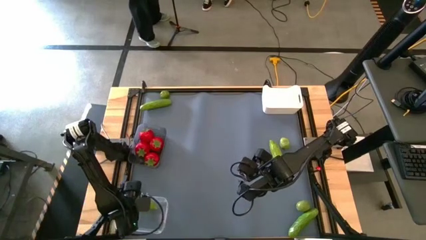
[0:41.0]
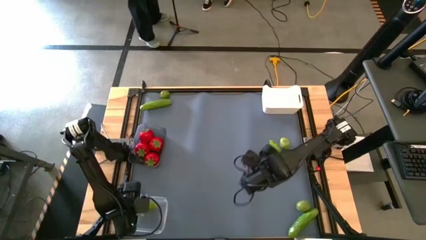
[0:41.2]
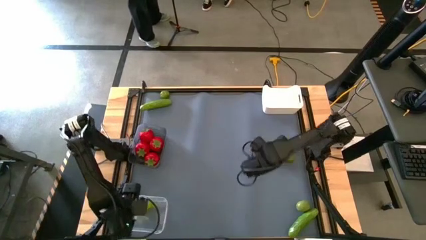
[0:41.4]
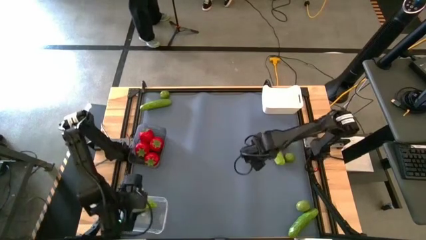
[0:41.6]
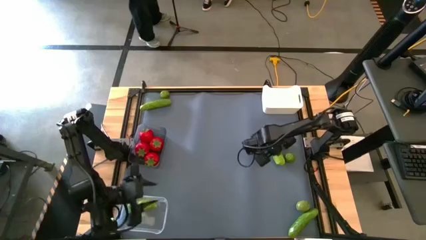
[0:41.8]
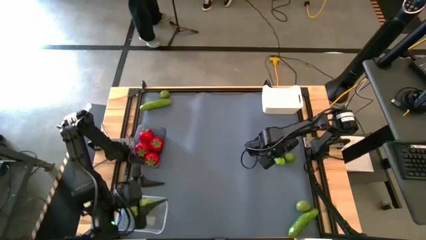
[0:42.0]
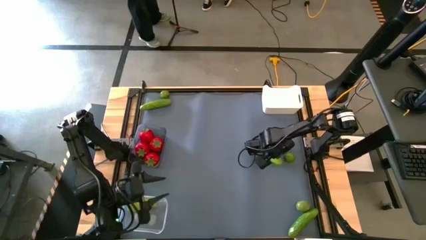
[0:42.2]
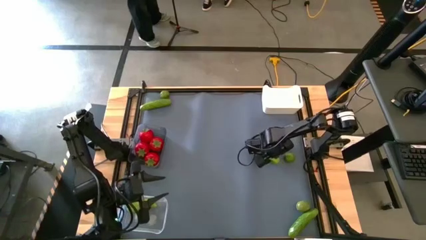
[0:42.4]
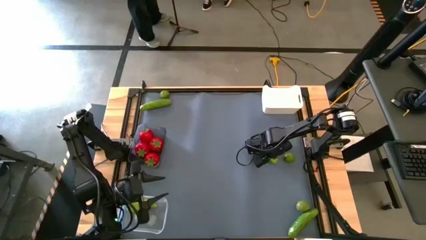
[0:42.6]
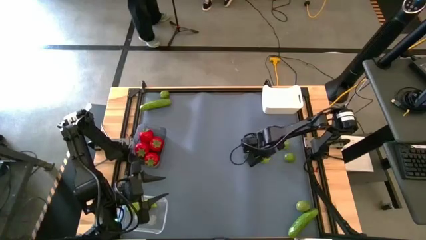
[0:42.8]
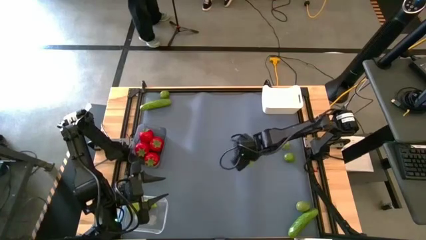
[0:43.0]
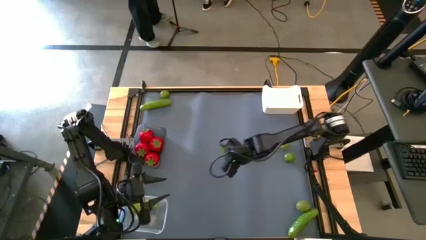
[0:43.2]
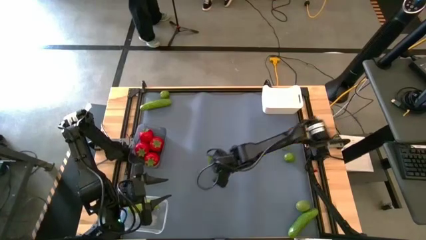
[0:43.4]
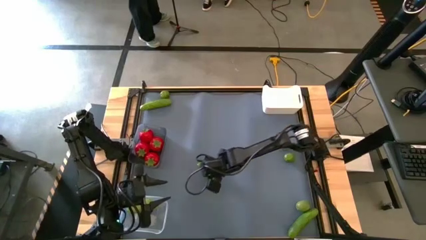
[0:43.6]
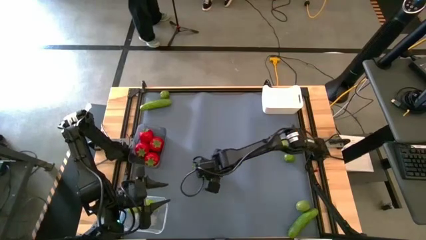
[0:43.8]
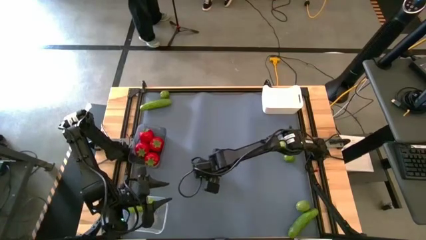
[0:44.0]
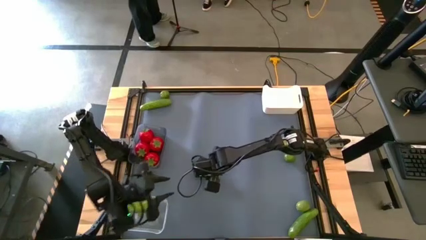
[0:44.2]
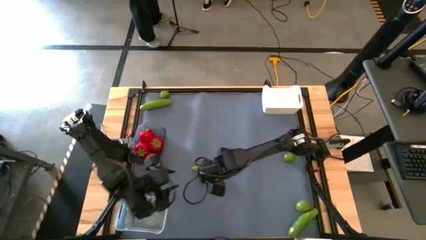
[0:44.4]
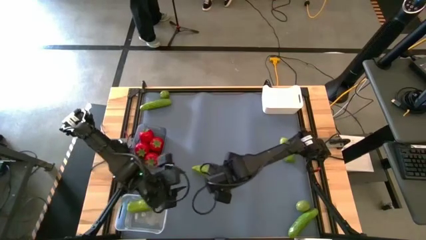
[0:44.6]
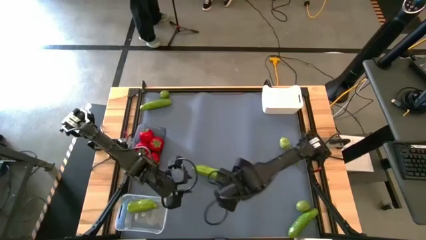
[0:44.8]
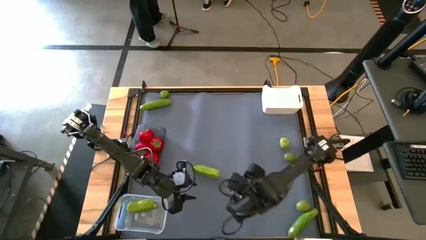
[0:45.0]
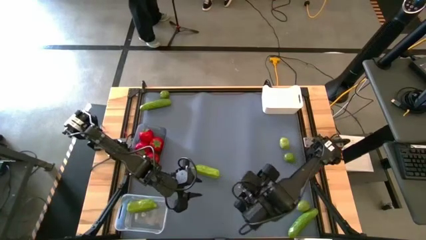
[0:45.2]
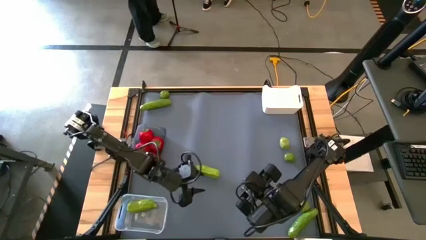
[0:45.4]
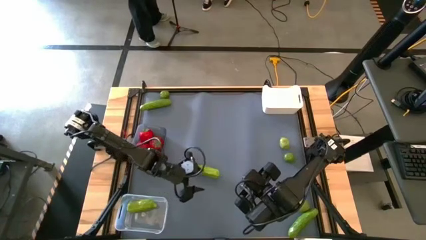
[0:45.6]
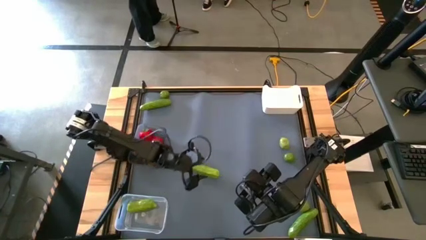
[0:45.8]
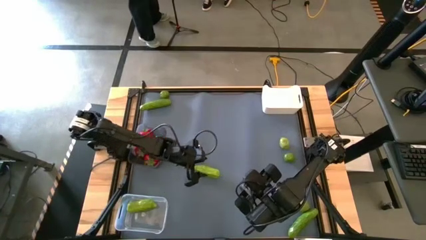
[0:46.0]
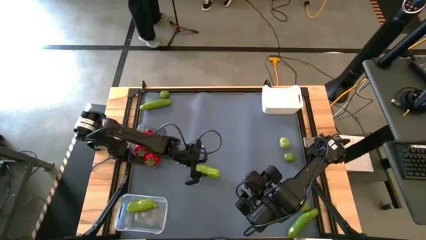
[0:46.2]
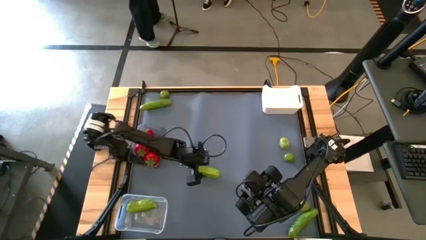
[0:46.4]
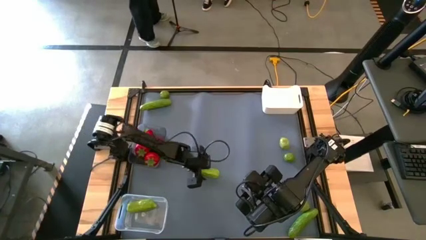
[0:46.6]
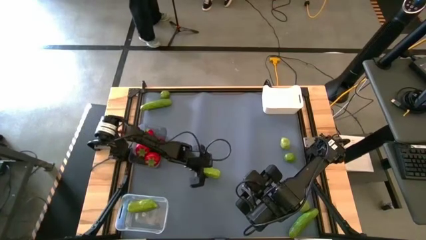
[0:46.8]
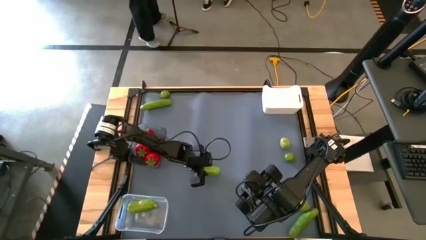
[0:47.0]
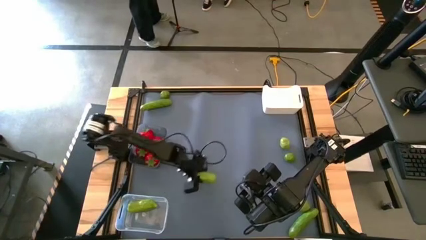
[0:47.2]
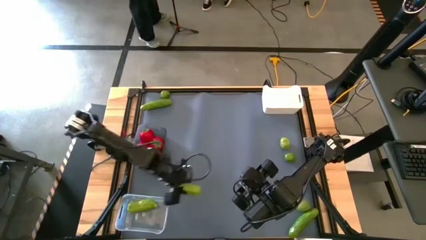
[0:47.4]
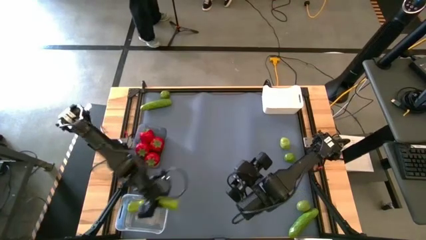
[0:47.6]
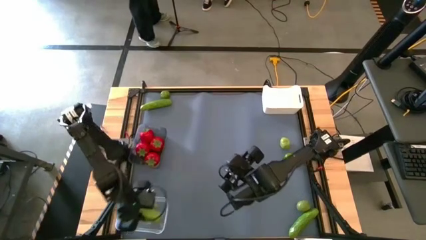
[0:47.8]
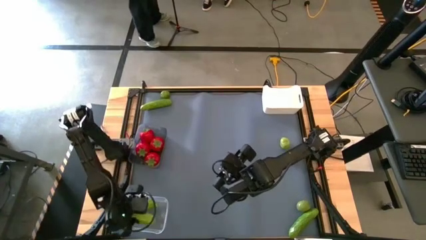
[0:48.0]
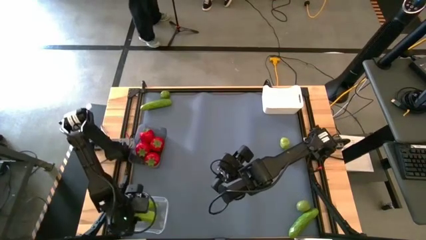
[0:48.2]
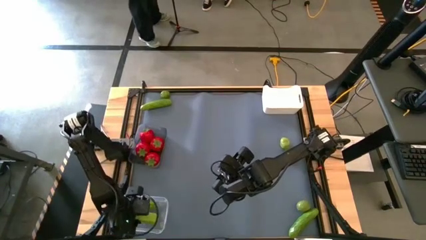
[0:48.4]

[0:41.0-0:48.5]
Task: Sort produce into baskets
Put the middle right pickle into the transparent bin

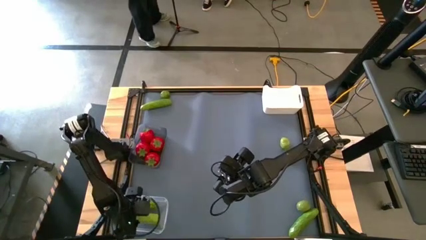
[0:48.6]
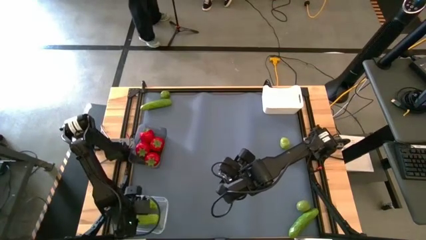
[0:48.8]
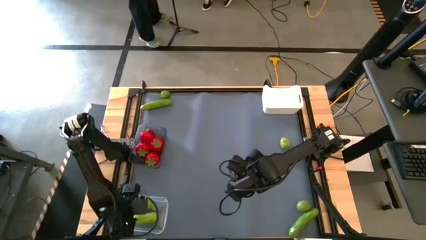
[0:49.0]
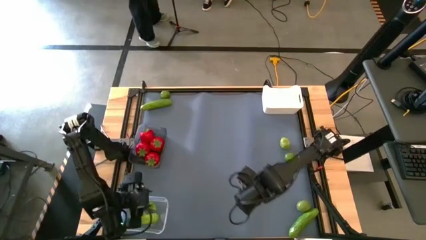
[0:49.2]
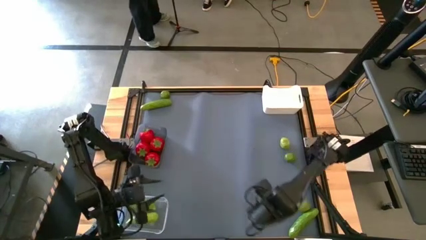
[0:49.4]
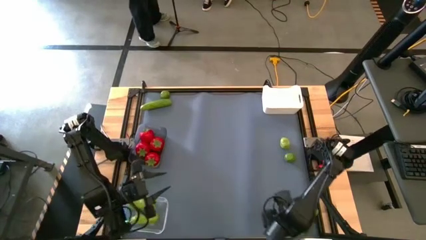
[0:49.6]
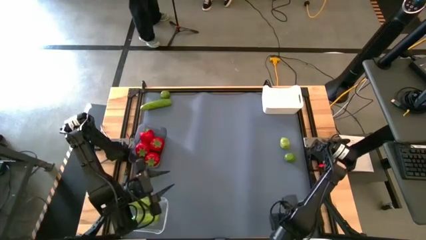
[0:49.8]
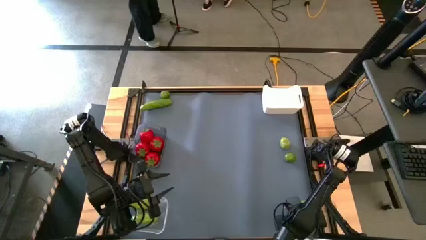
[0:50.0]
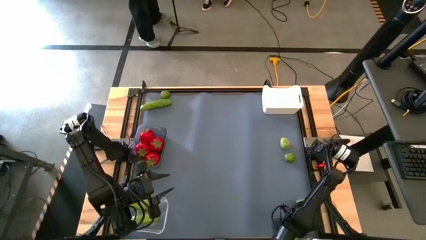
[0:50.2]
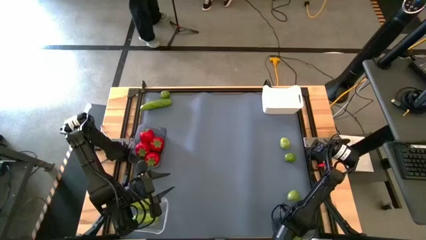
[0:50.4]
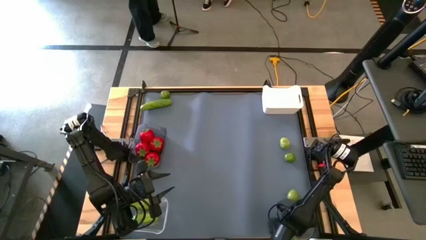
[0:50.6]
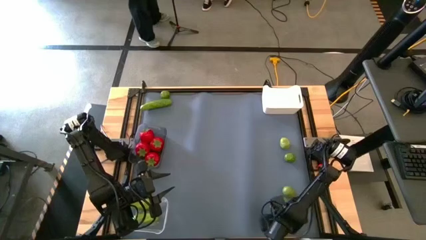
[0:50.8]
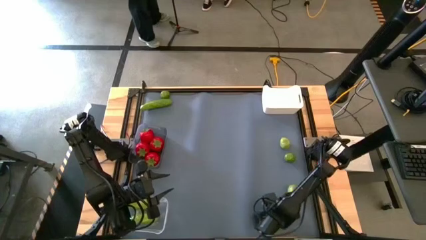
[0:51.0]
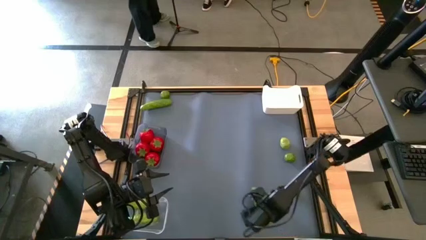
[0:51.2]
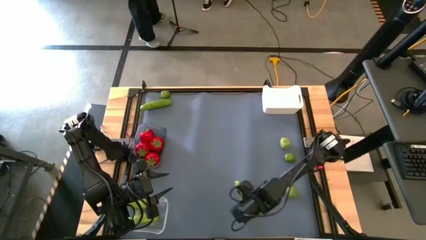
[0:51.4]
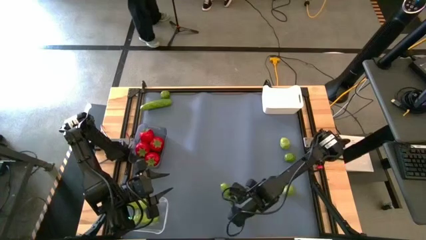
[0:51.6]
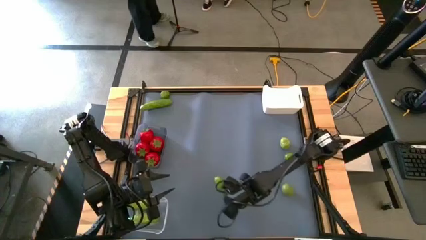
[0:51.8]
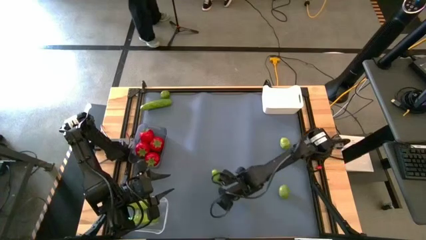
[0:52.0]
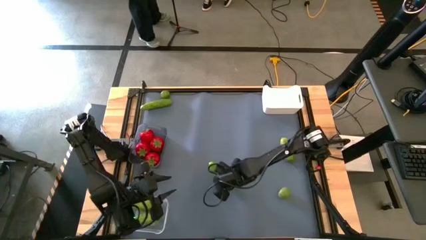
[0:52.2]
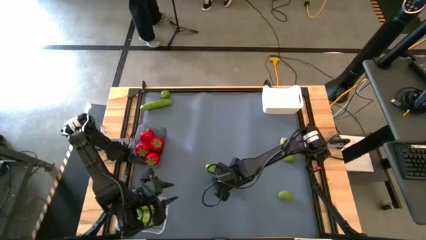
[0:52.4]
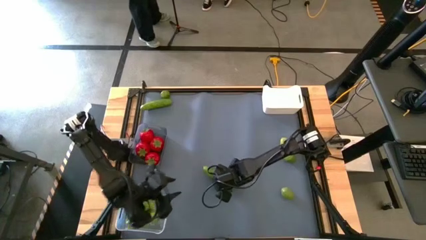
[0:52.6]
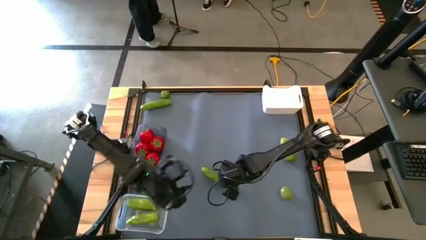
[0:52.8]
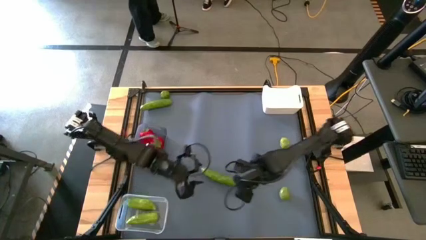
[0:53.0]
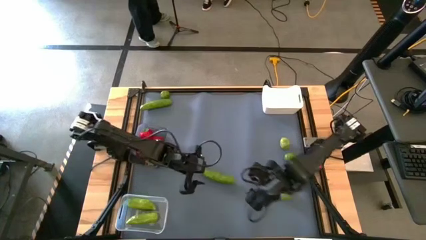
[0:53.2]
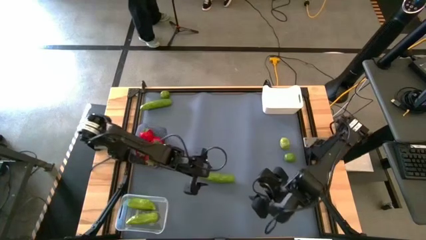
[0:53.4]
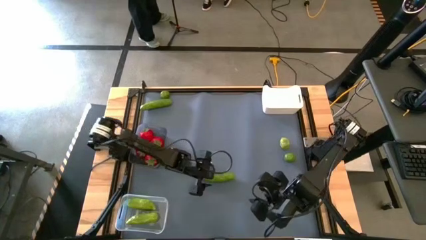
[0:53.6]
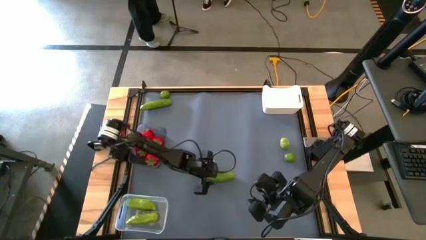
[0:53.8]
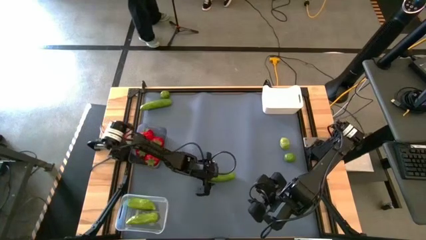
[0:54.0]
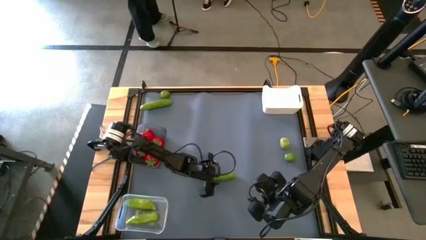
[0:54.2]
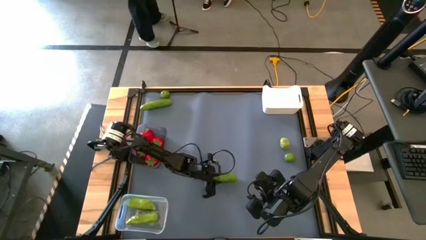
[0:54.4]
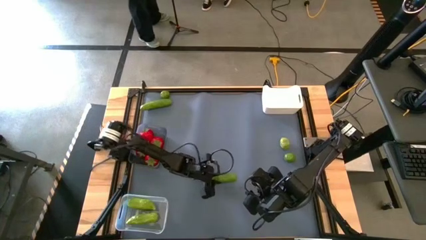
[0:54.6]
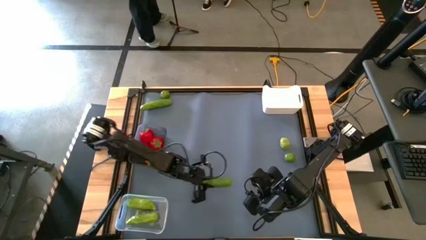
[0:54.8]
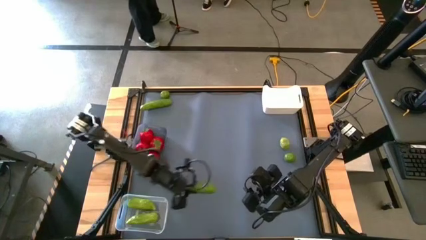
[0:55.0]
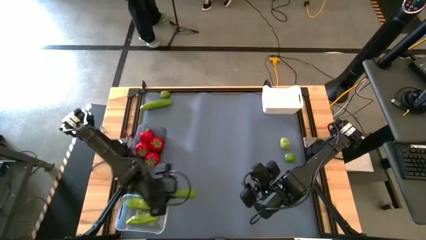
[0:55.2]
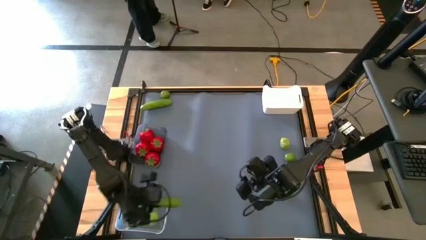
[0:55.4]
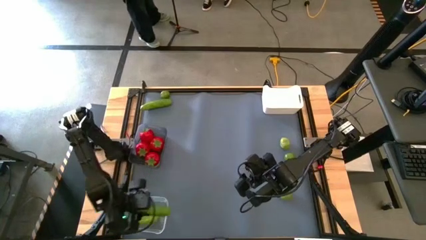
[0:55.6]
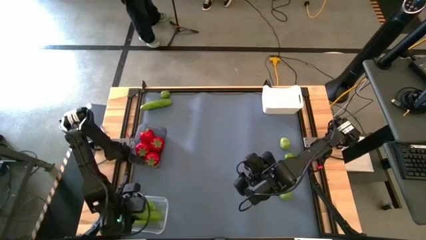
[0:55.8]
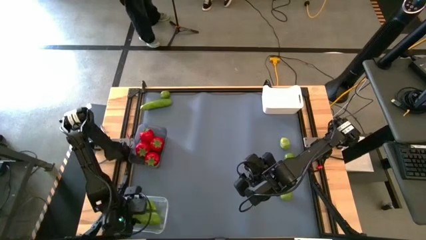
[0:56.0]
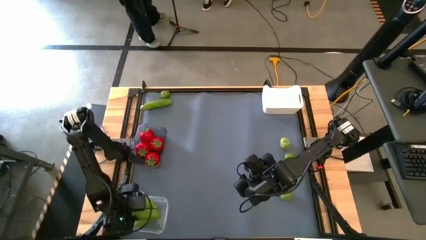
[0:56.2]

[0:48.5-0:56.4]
Put the bottom pickle into the transparent bin
